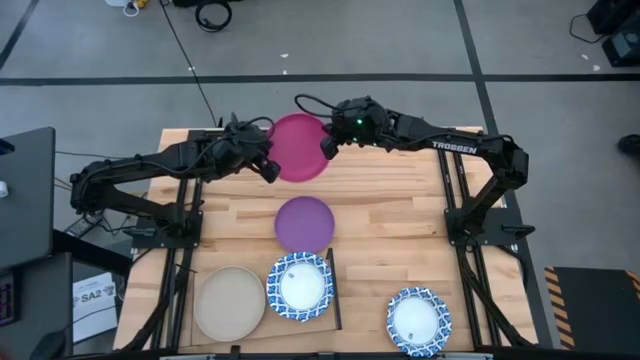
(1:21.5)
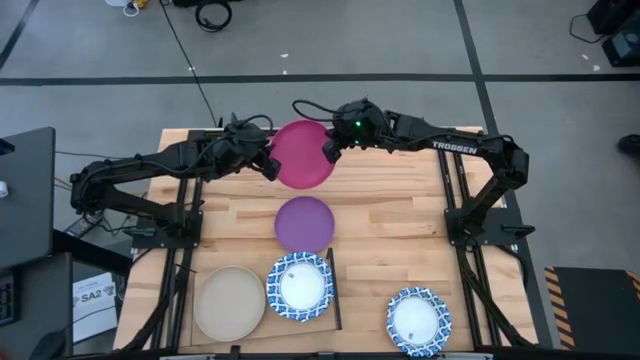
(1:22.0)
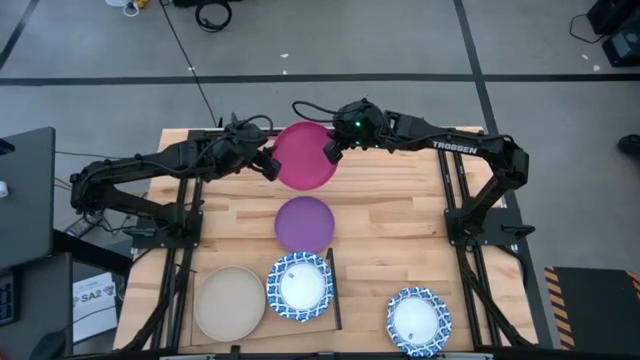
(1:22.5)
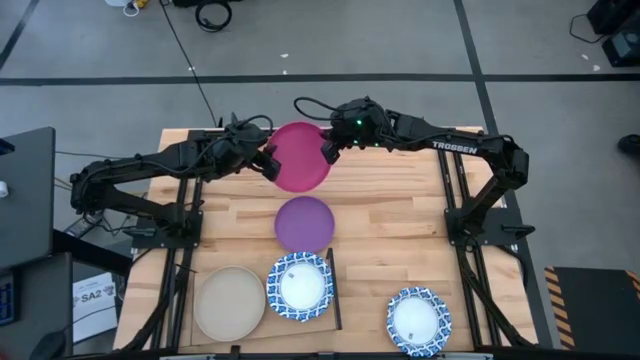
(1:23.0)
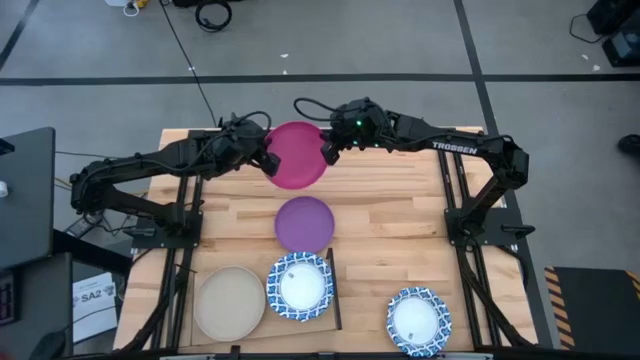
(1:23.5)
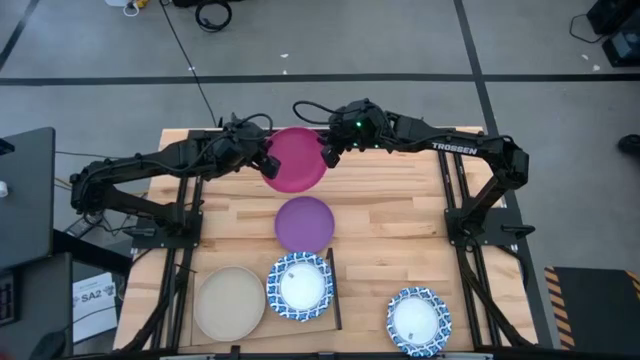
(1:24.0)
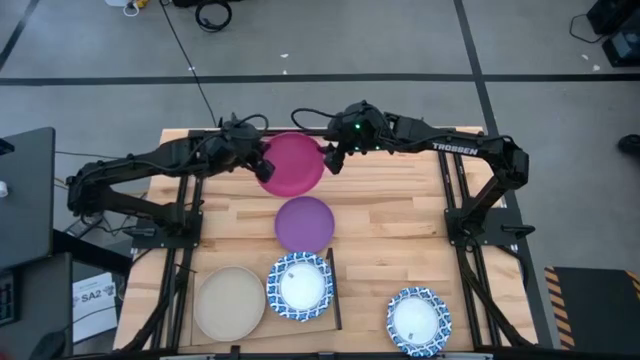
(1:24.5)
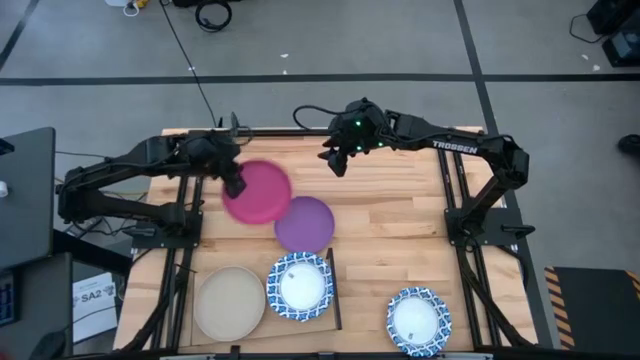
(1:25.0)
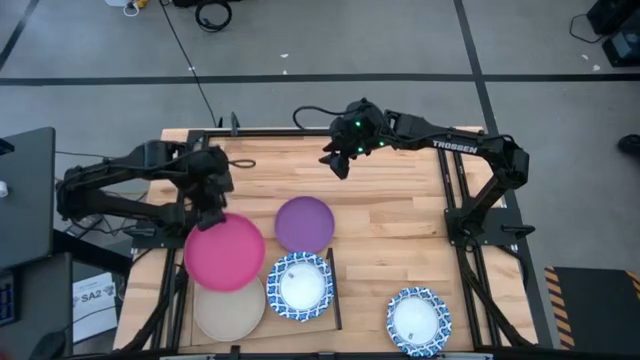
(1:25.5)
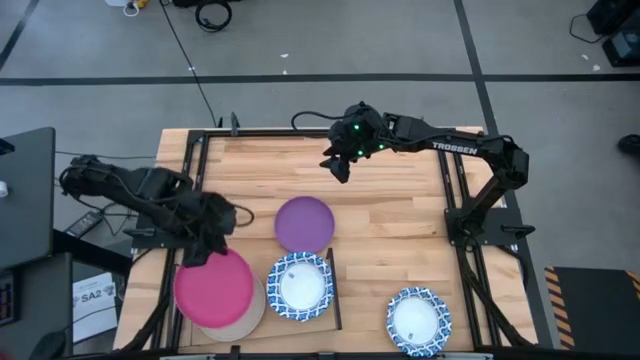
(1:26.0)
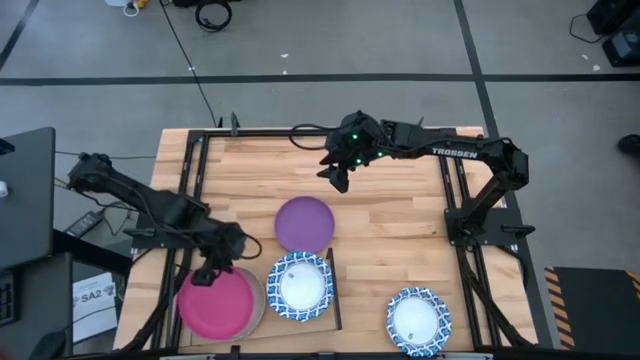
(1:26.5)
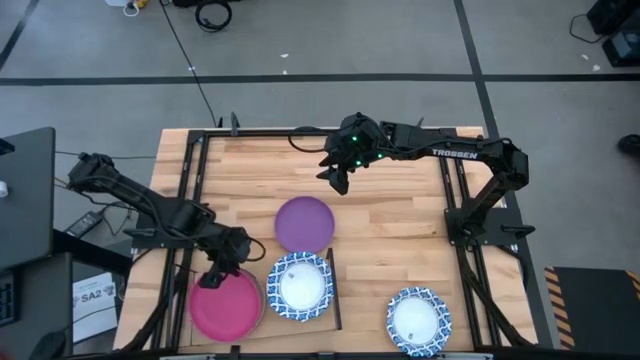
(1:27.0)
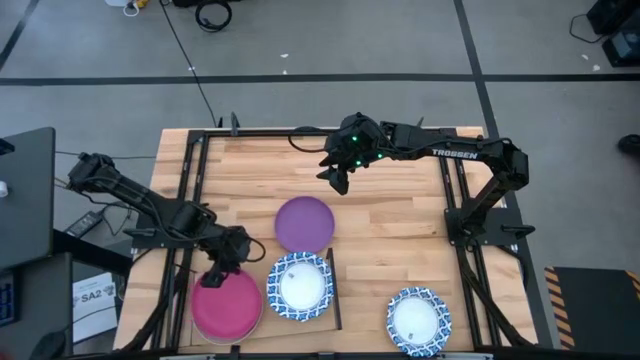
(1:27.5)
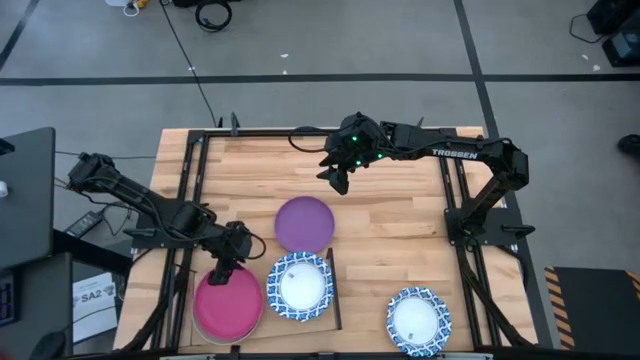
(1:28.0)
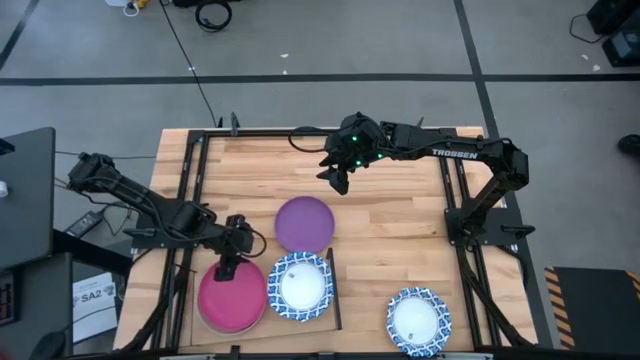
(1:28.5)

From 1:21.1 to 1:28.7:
Task: Place and stack plates onto a shelf
Stack the pink plate on top of the gray plate on the shelf

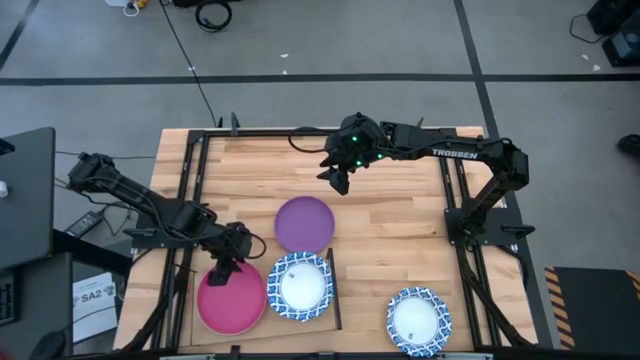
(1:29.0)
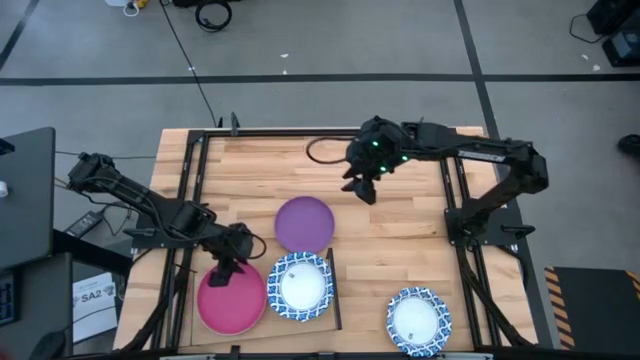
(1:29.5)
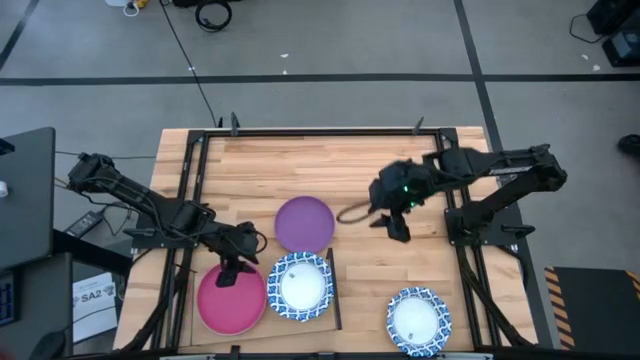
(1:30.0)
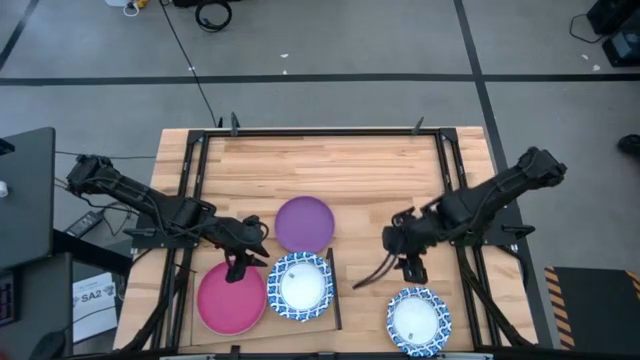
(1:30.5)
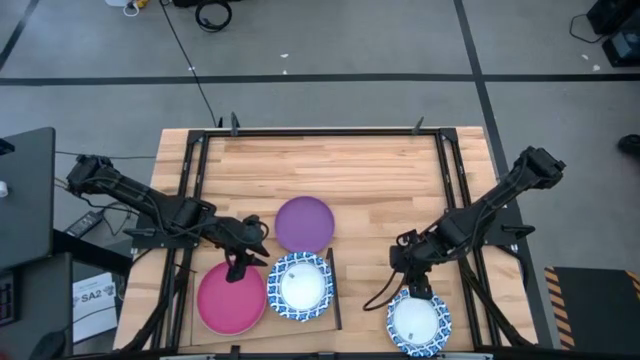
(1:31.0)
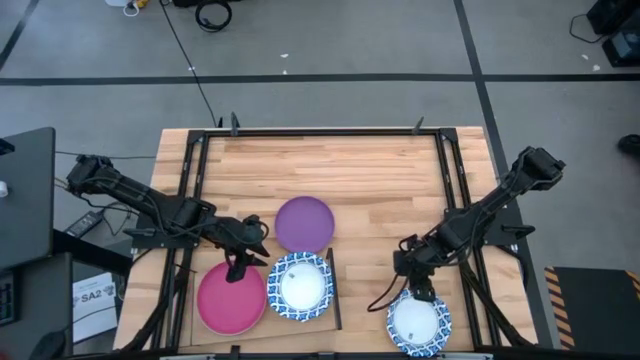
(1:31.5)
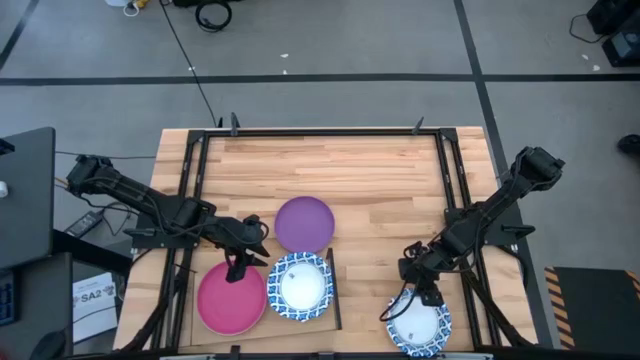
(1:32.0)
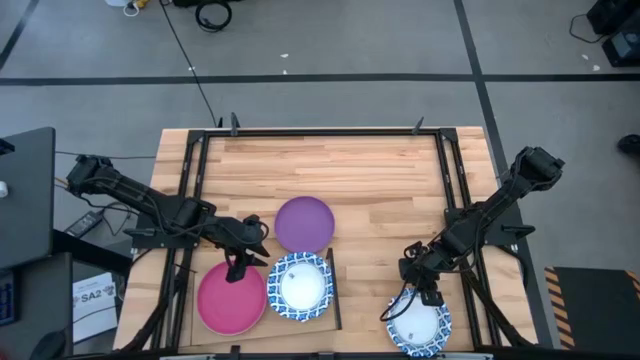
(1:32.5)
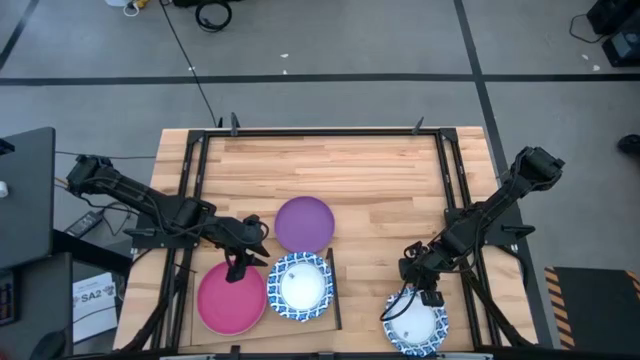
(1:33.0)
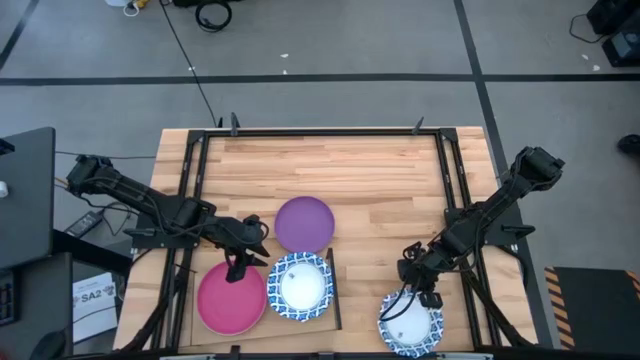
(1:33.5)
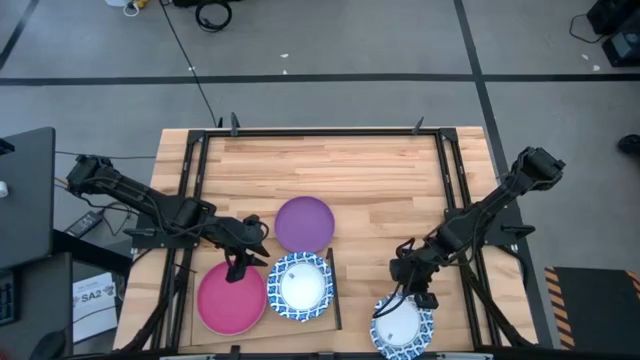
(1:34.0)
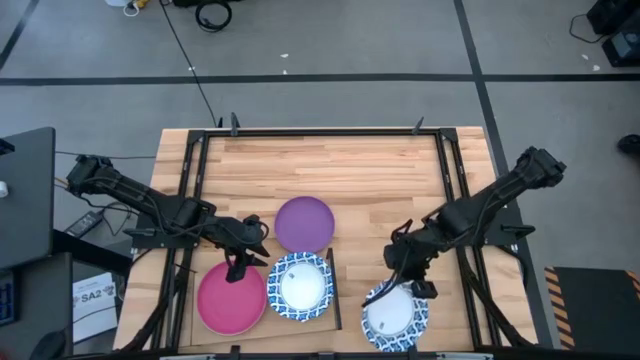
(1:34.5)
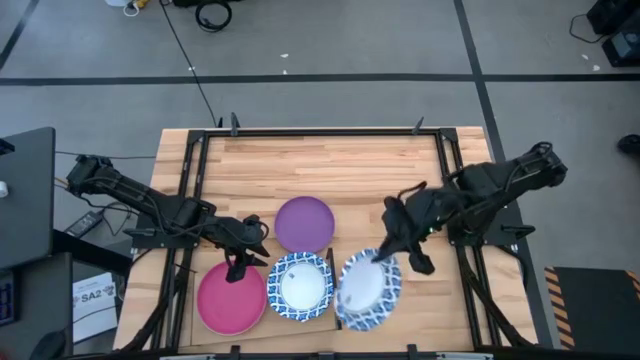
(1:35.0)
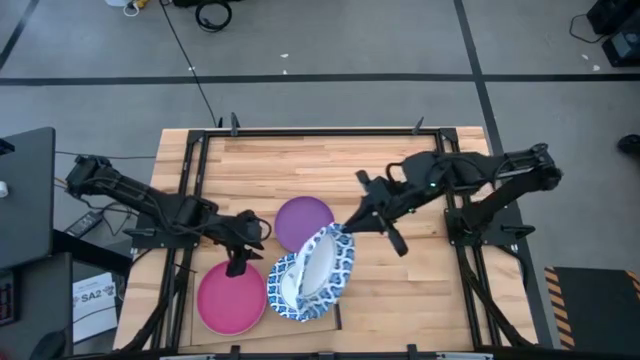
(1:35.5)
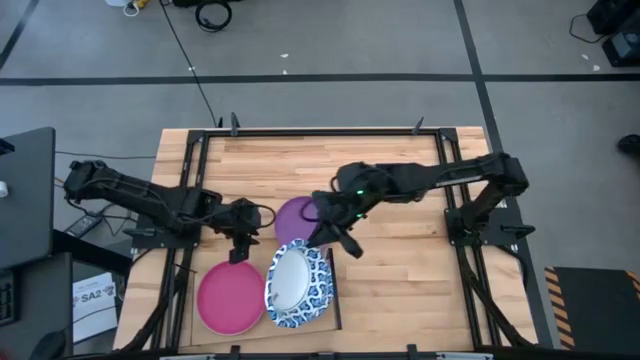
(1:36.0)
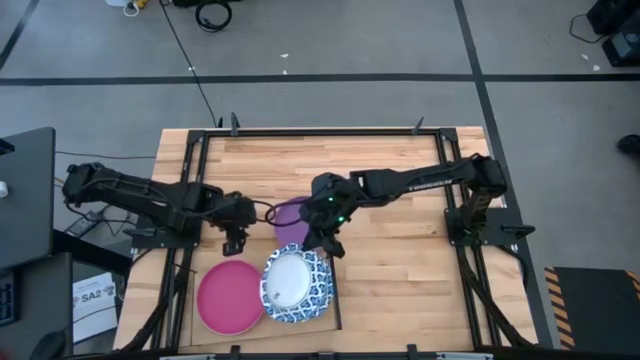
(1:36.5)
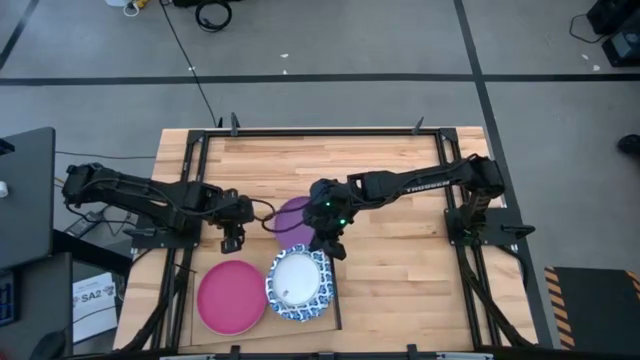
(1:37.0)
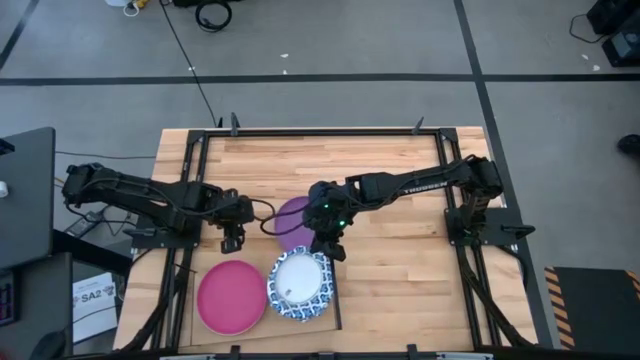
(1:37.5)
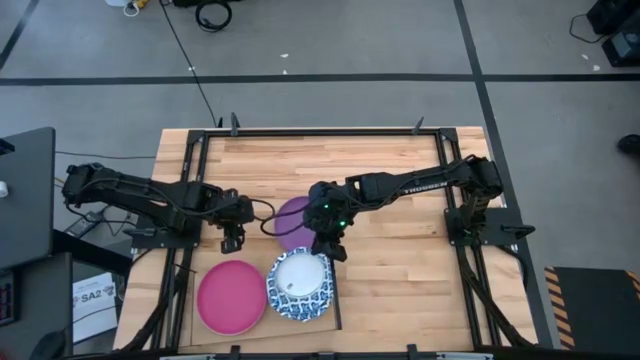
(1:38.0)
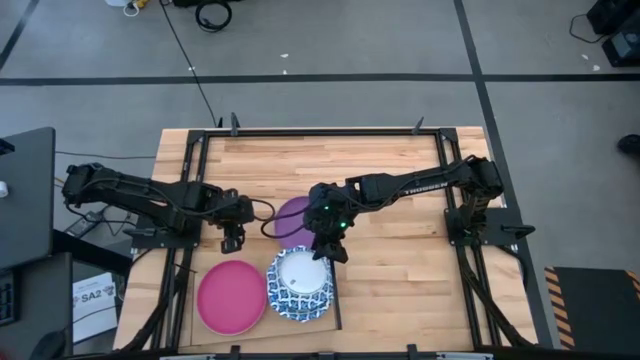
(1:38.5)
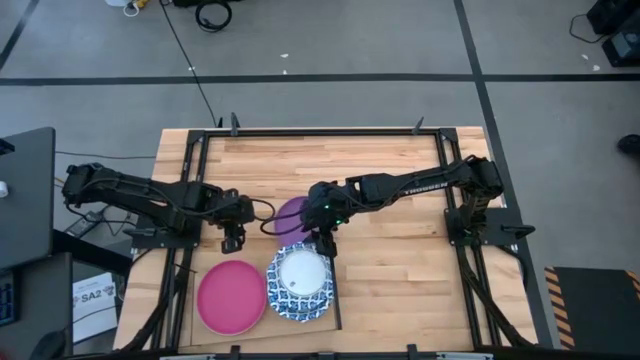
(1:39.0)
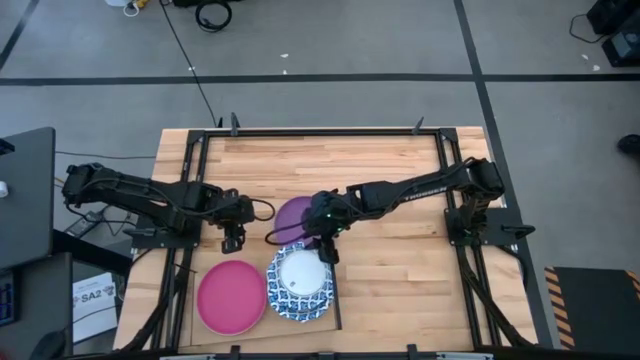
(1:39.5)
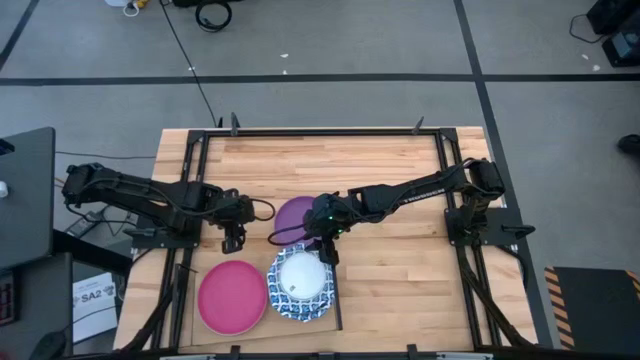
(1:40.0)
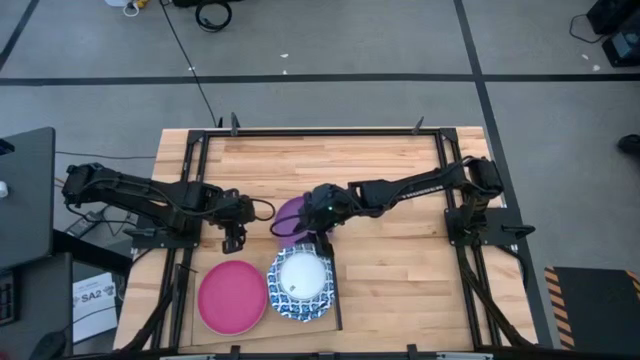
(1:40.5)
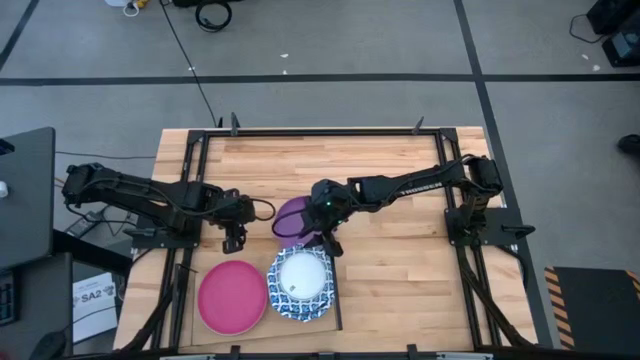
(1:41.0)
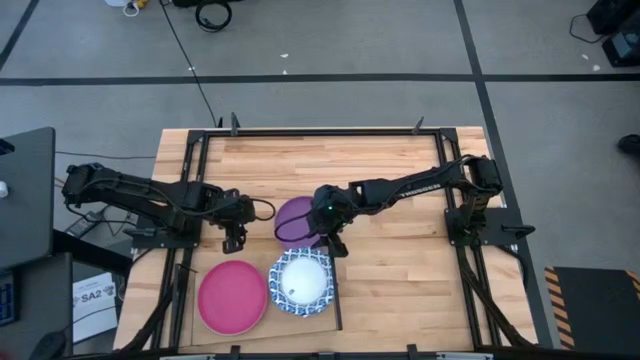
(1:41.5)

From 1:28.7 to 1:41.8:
Stack the blue patterned bowl on top of the blue patterned bowl on the shelf

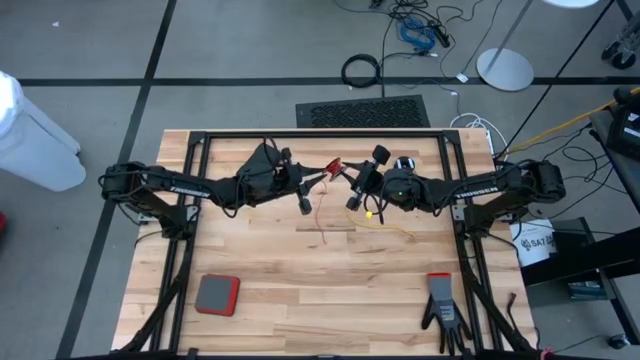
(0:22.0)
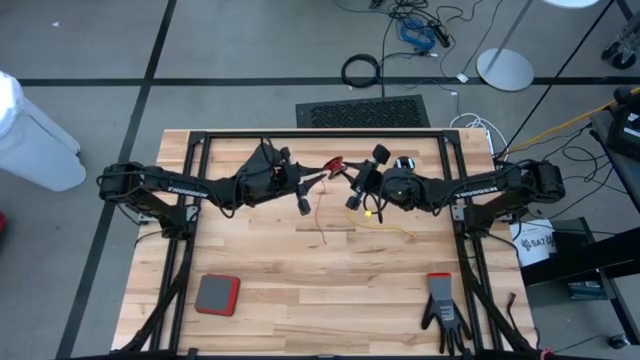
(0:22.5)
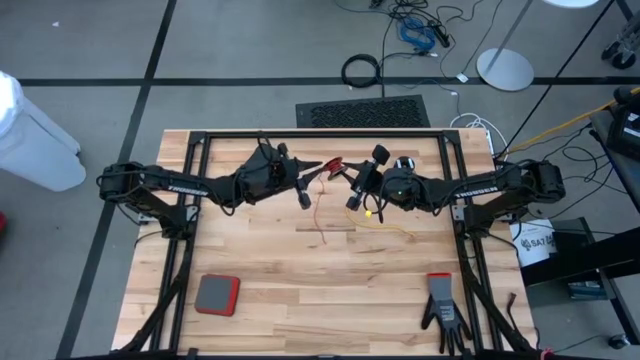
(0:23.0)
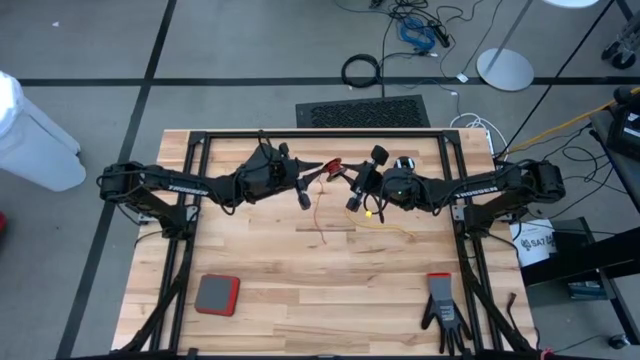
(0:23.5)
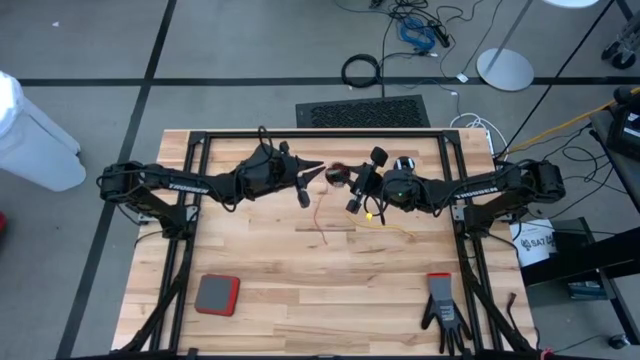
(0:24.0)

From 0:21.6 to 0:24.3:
Task: Coil cords
Uncoil the red wire from the spool
